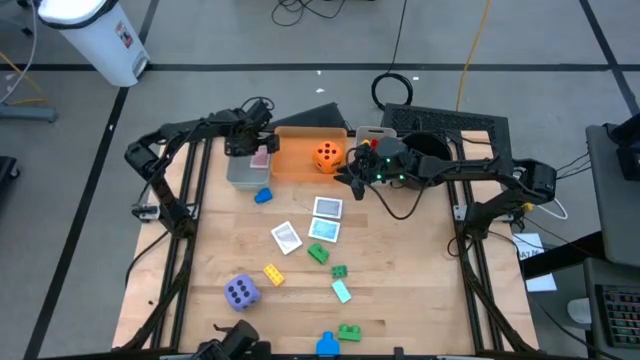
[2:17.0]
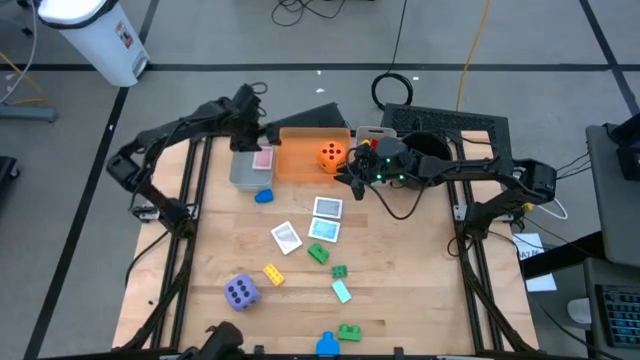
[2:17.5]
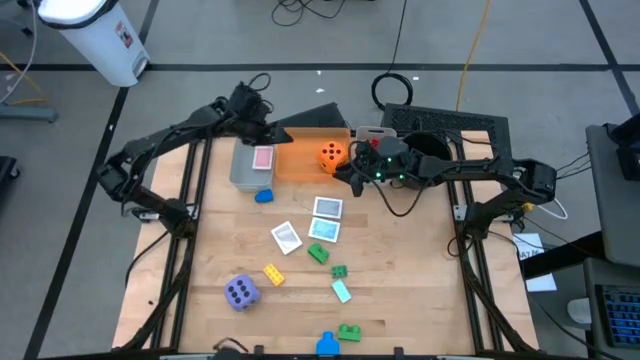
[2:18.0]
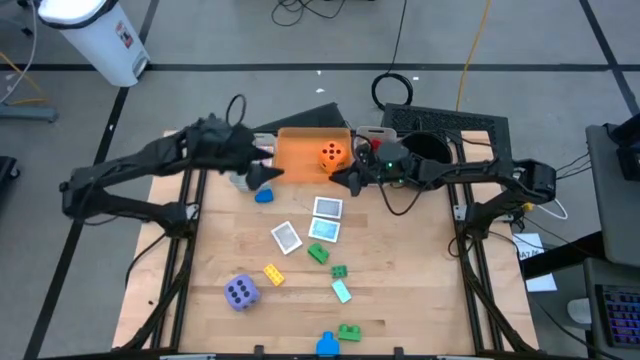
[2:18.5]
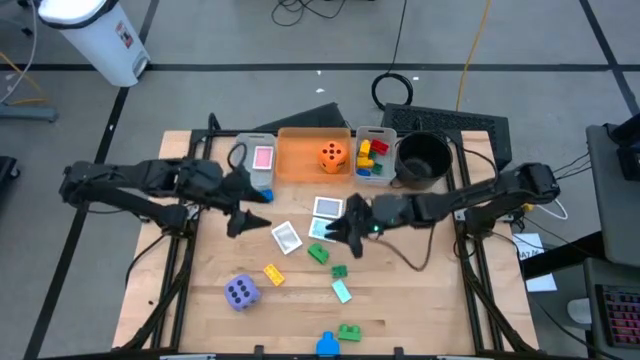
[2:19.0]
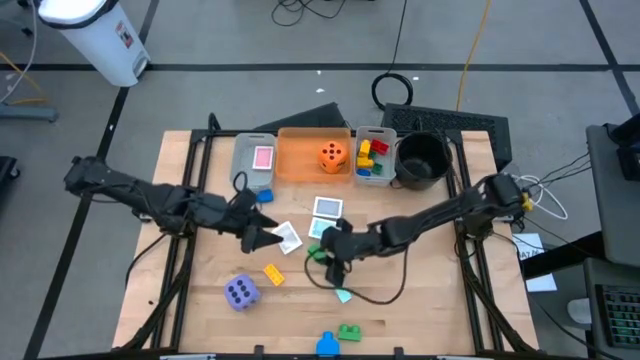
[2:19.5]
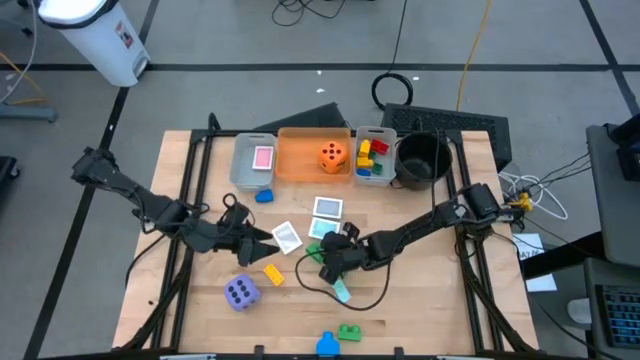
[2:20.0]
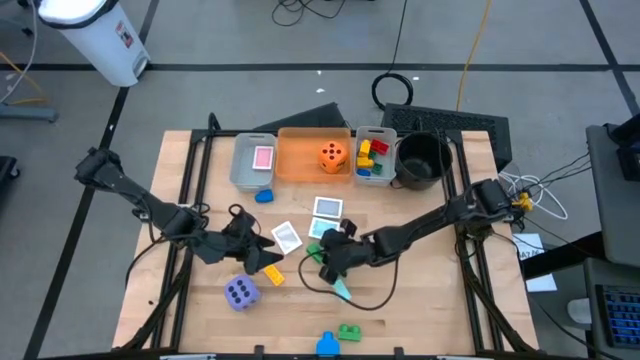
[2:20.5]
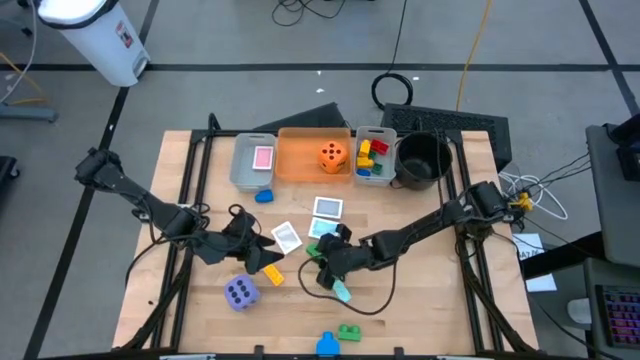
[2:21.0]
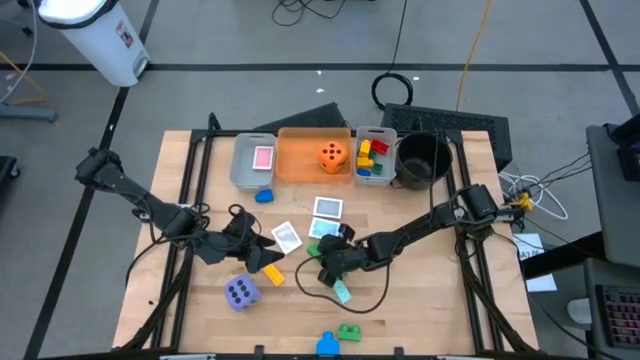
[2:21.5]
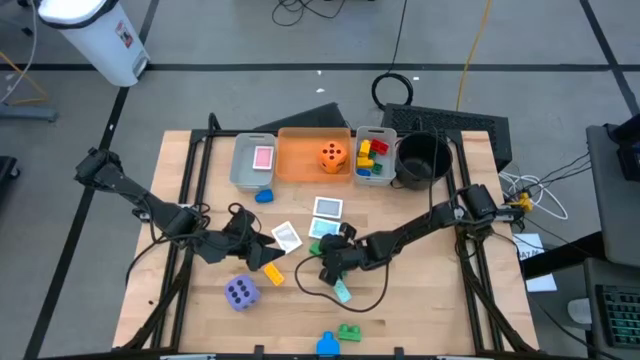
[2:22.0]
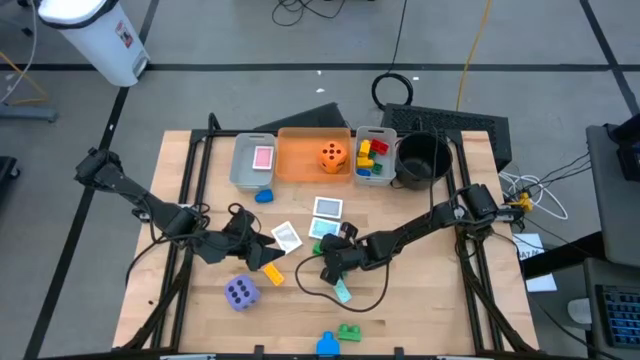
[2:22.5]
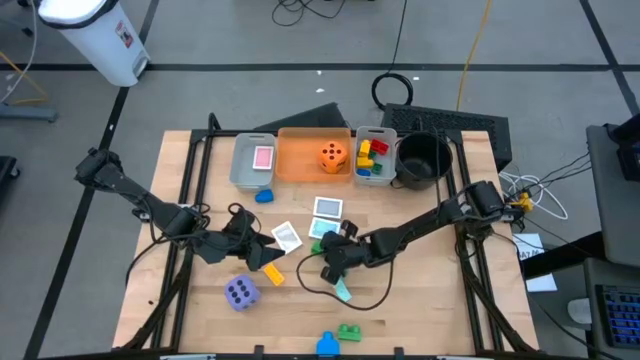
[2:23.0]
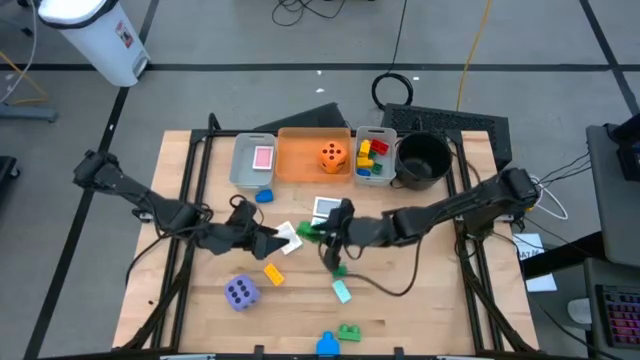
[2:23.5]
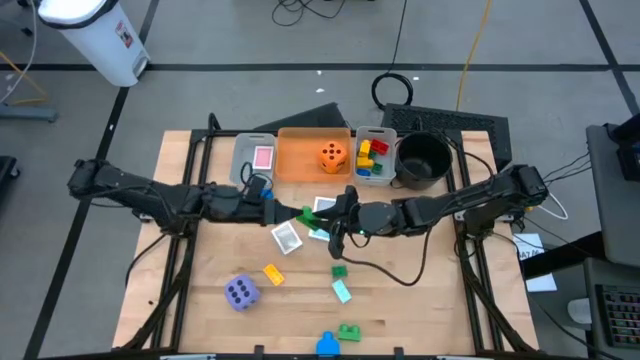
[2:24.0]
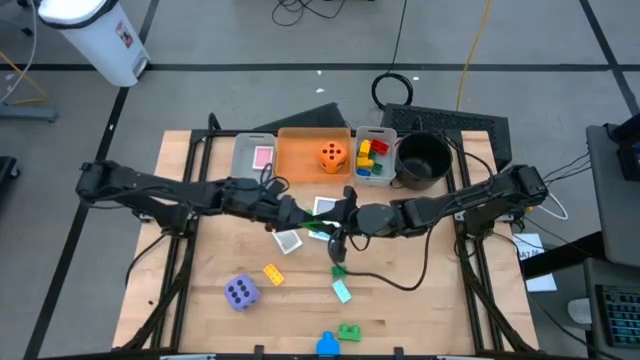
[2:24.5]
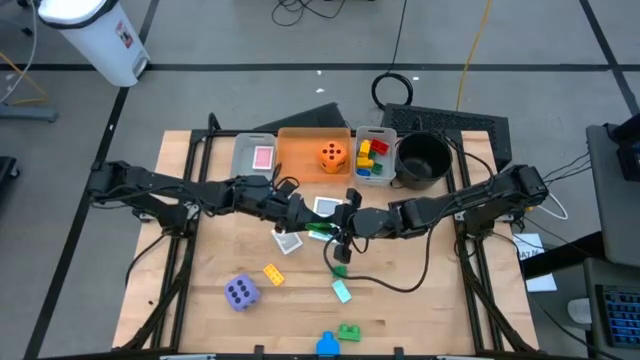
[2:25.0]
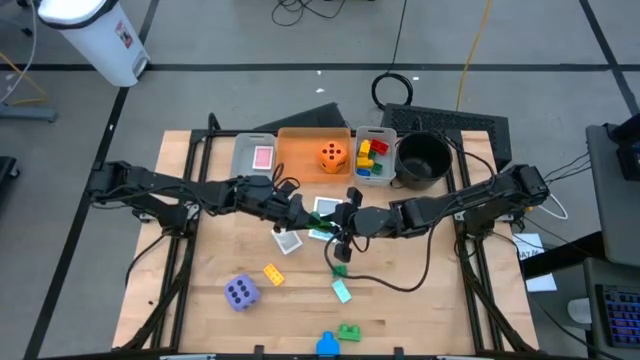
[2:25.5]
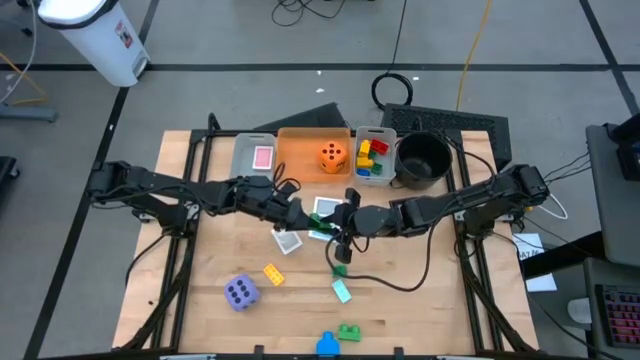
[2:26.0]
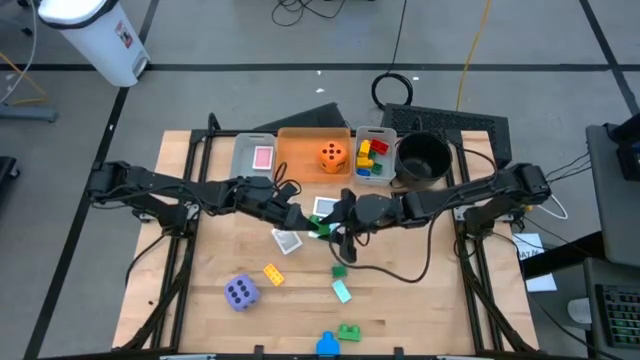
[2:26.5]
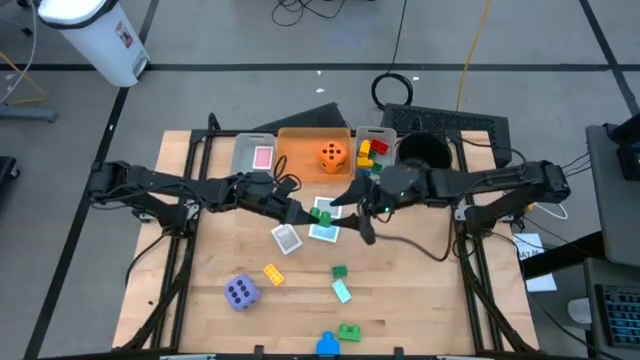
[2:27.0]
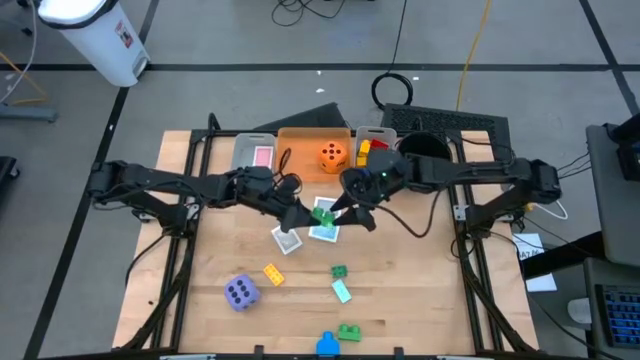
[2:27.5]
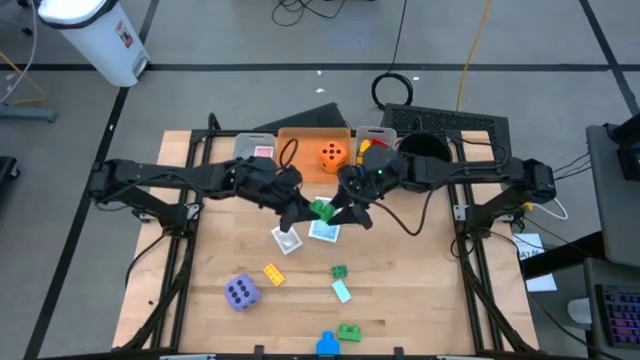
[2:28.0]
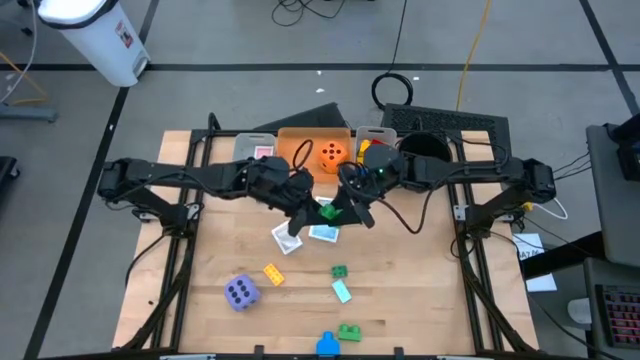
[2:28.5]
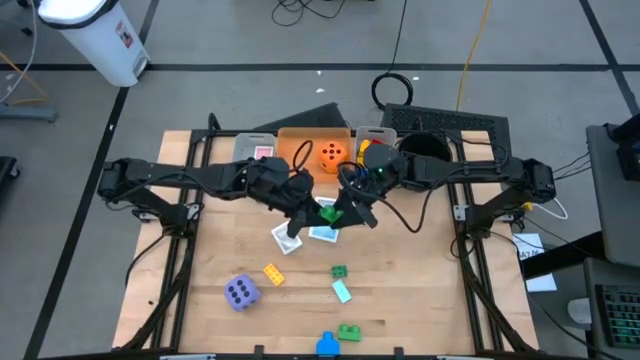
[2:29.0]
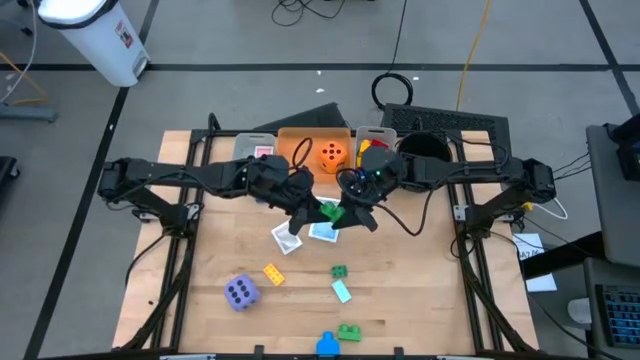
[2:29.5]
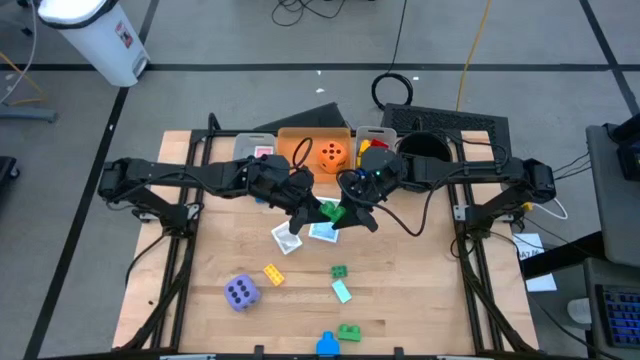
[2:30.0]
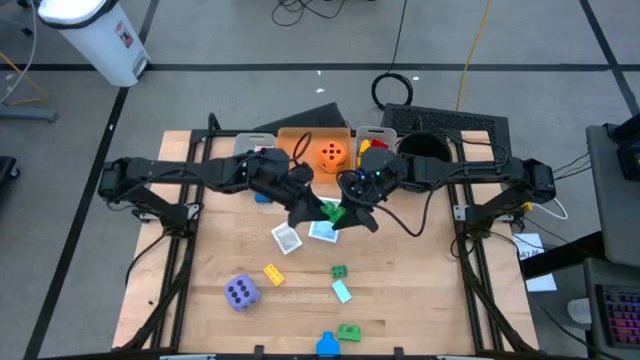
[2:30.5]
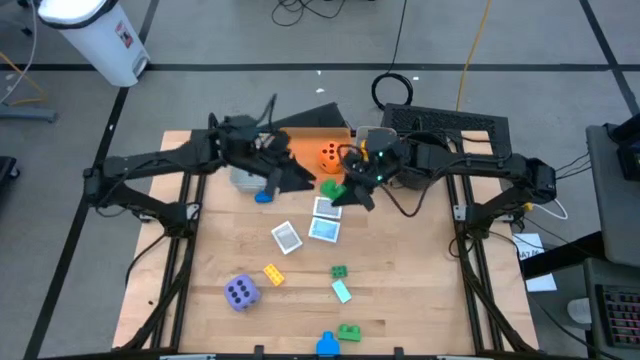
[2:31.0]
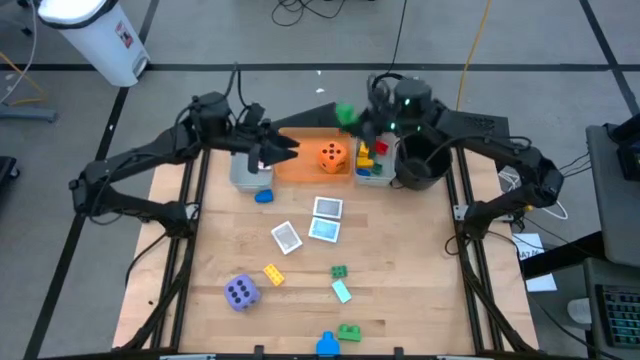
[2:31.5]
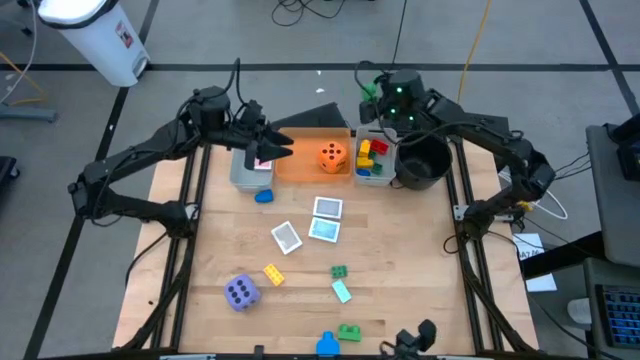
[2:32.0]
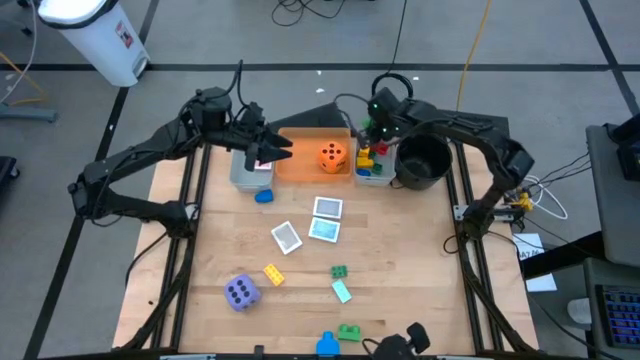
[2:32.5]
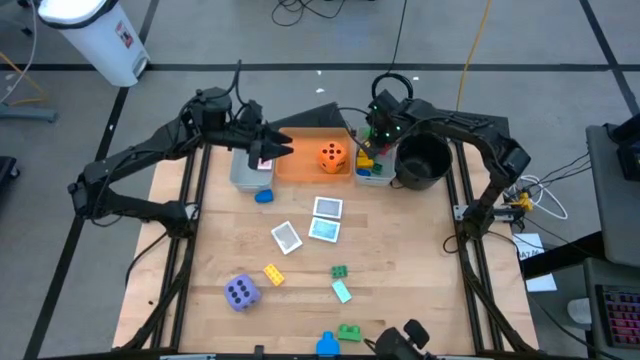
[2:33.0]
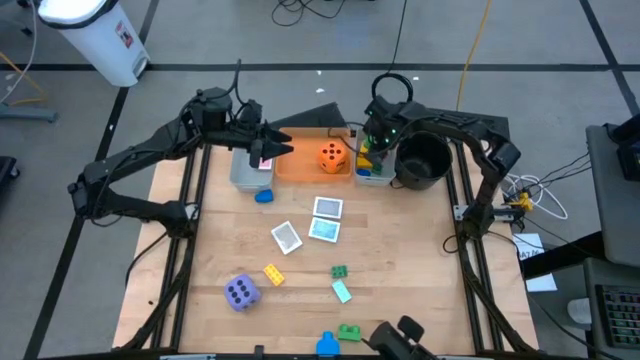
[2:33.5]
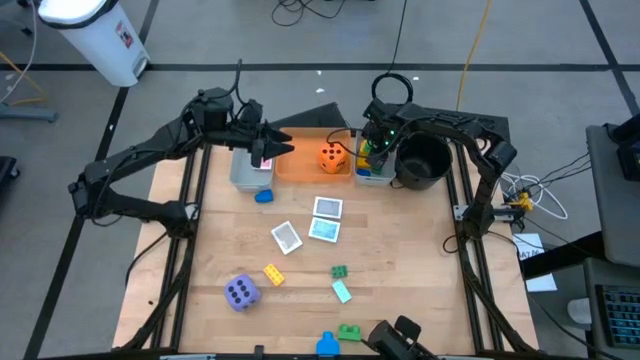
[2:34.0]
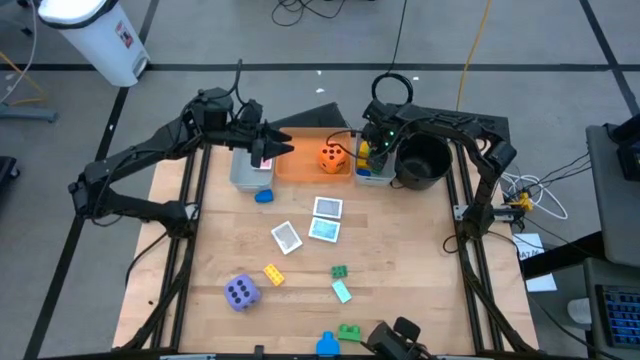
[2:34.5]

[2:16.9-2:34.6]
Task: Pick & Place Toys
Put the green game piece into the right gray bin

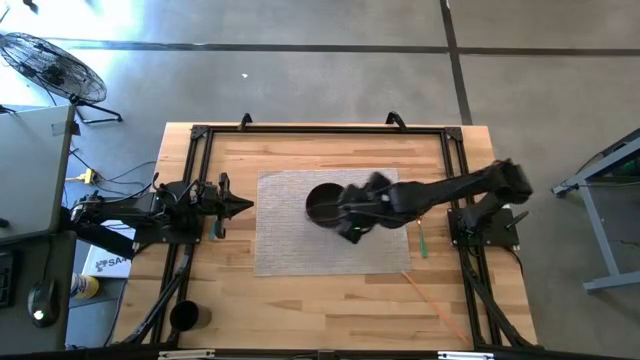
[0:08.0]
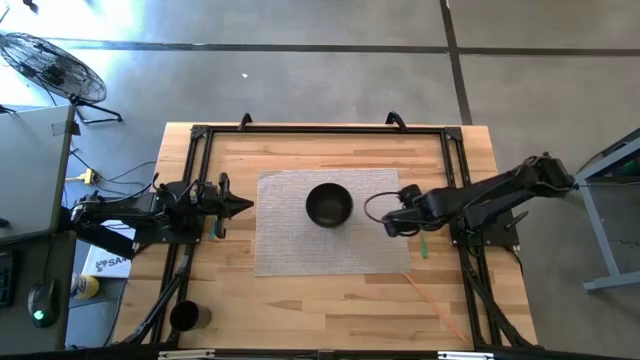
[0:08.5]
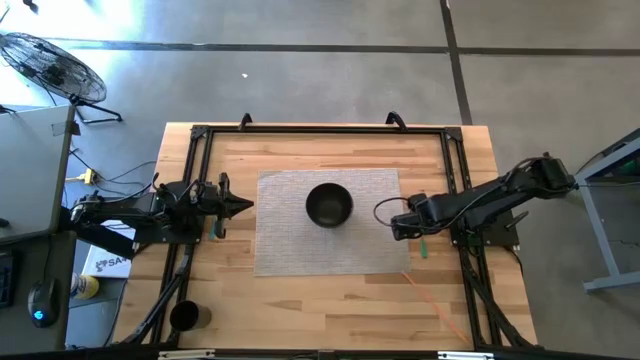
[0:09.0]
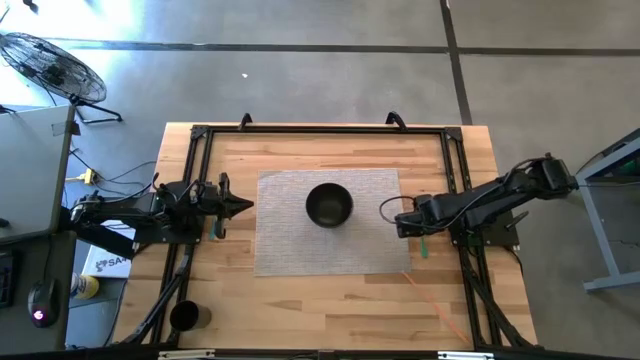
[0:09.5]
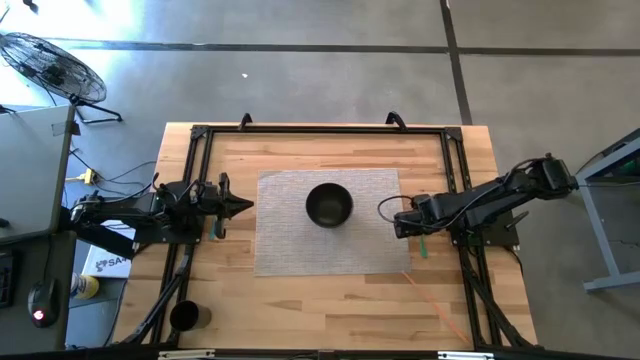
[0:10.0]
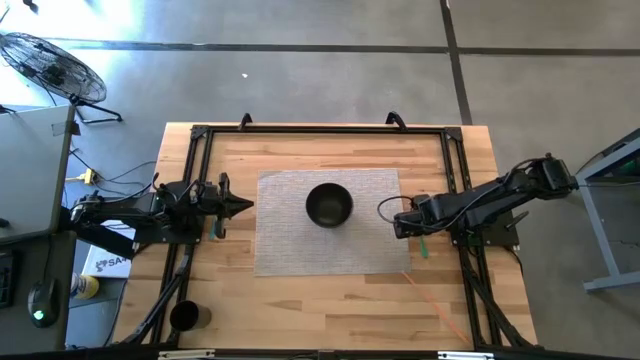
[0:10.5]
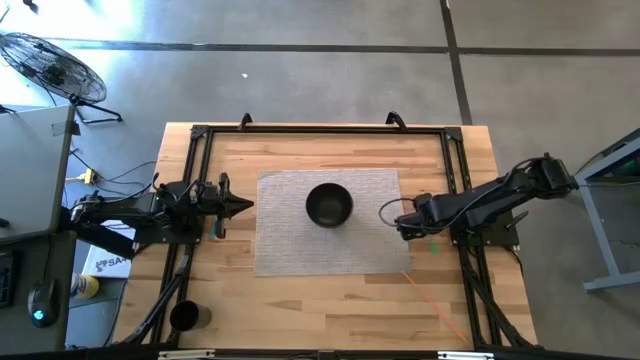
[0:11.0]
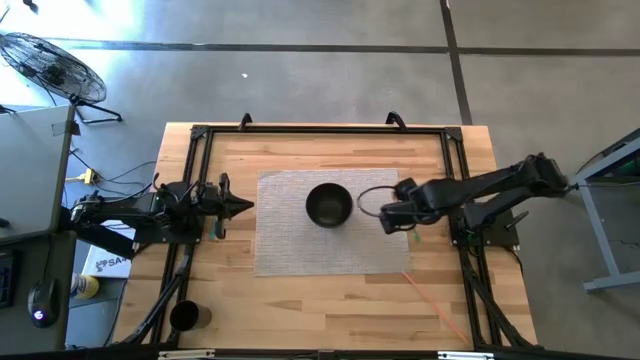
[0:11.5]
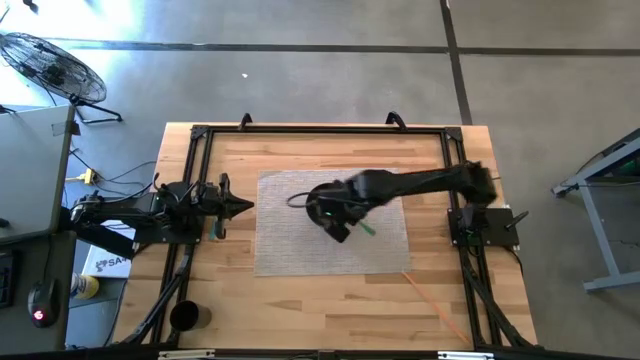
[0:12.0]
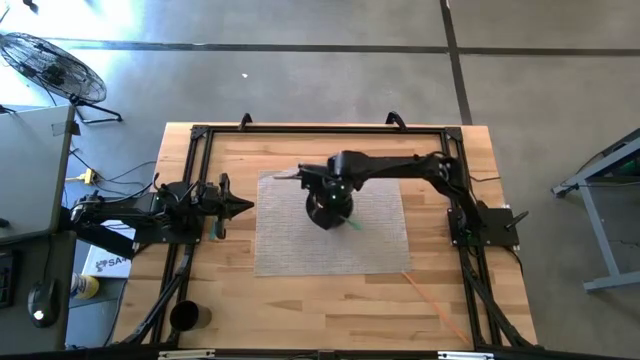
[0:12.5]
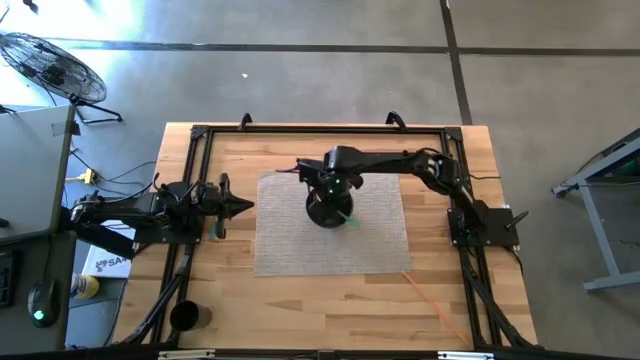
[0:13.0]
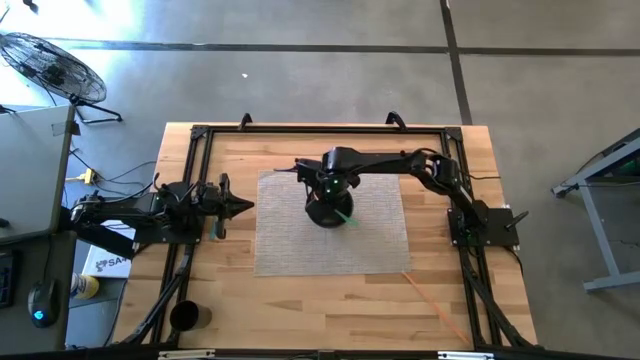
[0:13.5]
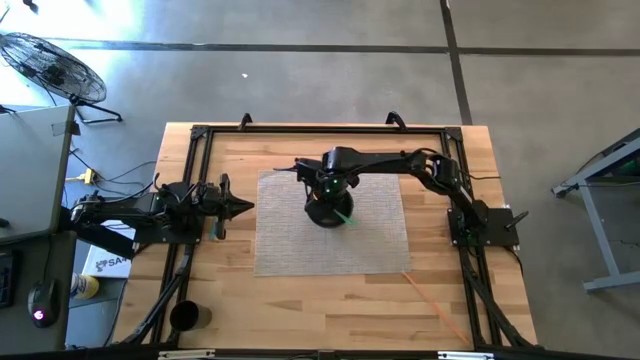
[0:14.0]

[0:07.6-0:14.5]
Task: Pick & Place Utensil
Put the gold spoon into the black bowl
